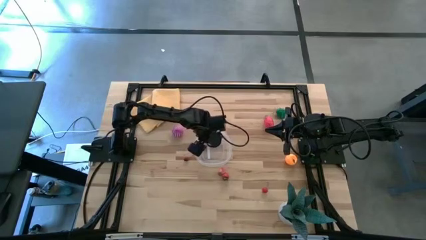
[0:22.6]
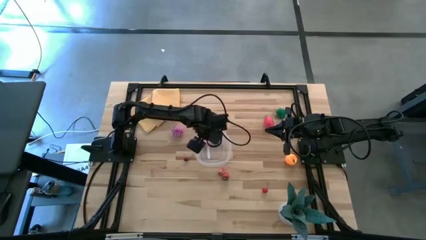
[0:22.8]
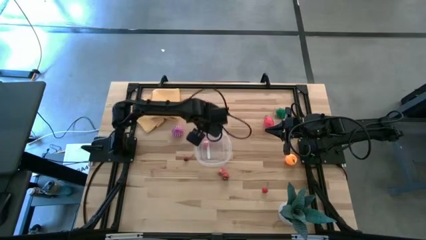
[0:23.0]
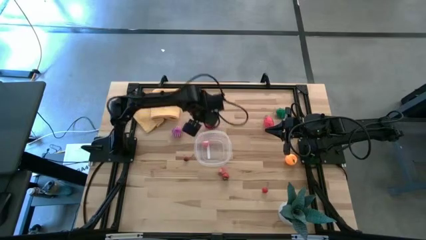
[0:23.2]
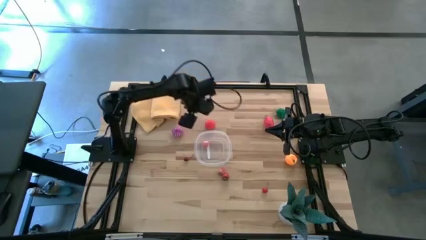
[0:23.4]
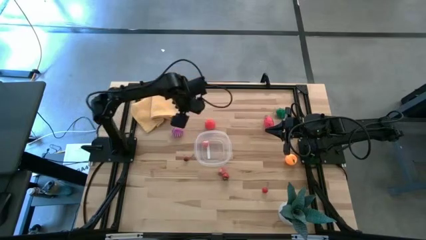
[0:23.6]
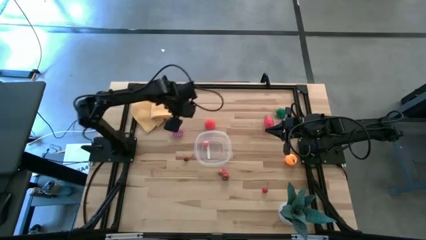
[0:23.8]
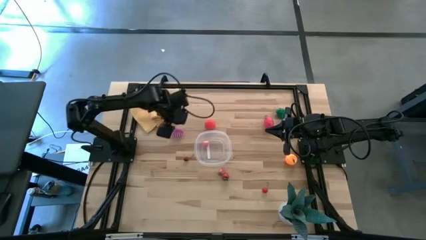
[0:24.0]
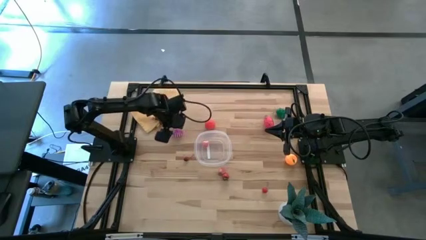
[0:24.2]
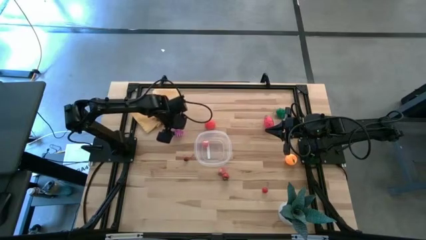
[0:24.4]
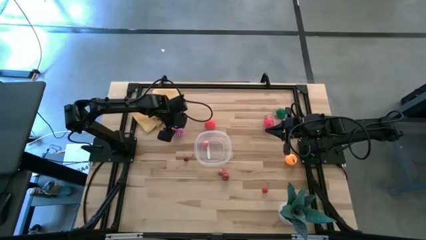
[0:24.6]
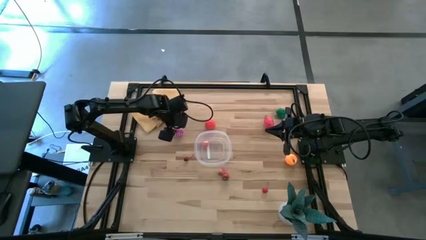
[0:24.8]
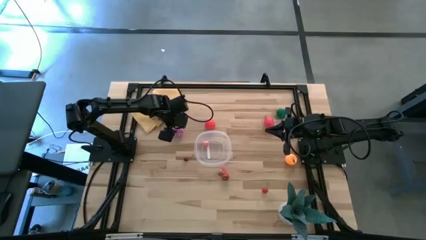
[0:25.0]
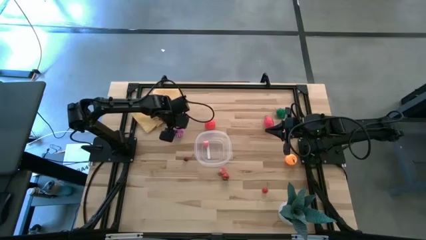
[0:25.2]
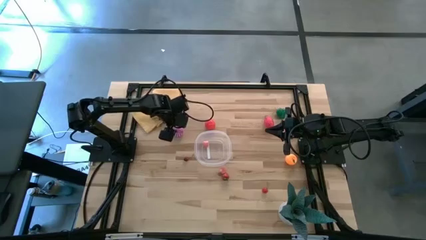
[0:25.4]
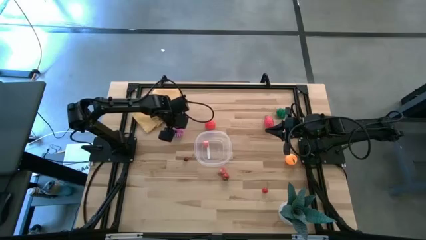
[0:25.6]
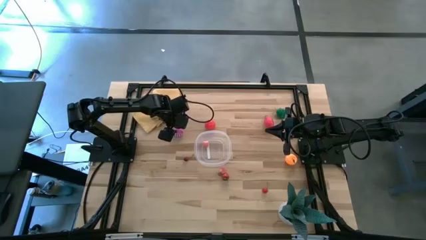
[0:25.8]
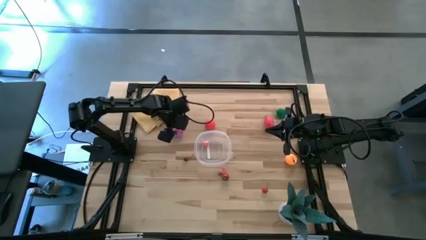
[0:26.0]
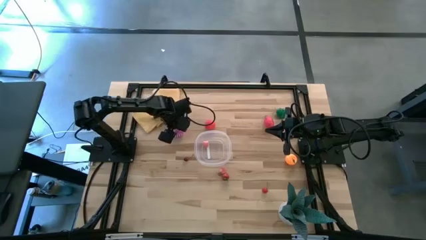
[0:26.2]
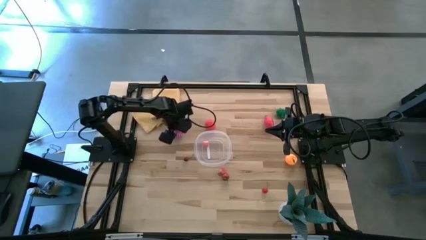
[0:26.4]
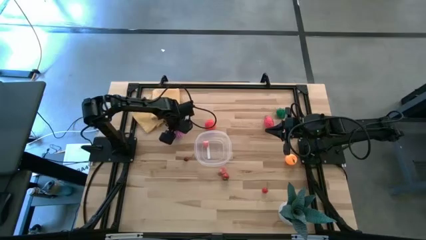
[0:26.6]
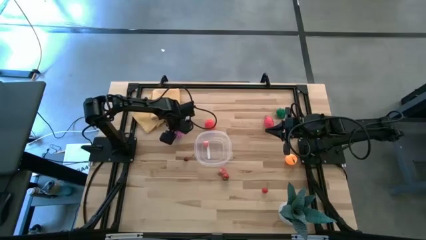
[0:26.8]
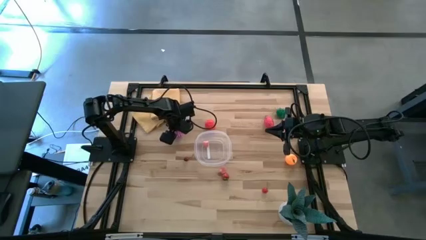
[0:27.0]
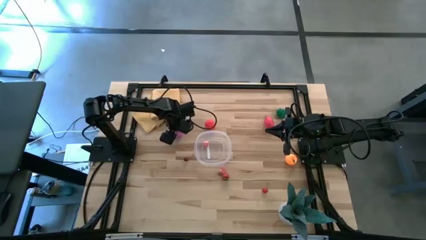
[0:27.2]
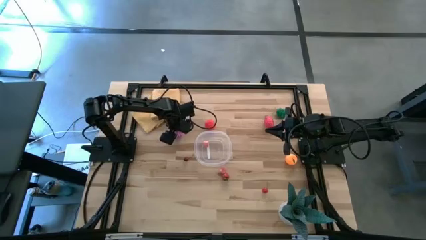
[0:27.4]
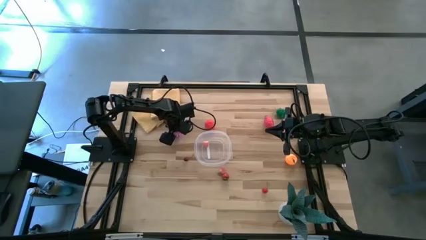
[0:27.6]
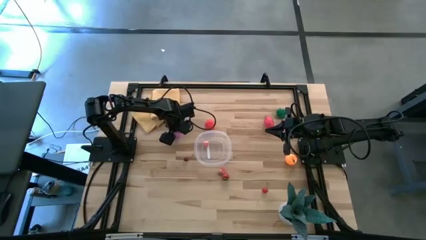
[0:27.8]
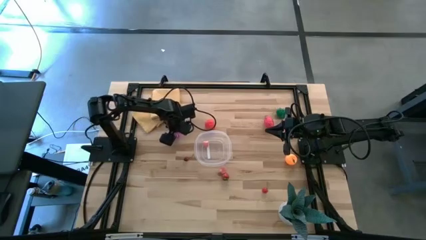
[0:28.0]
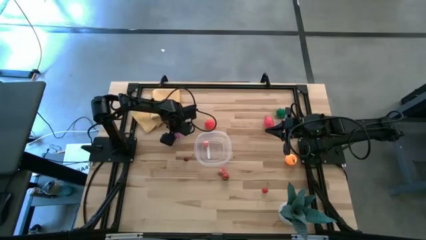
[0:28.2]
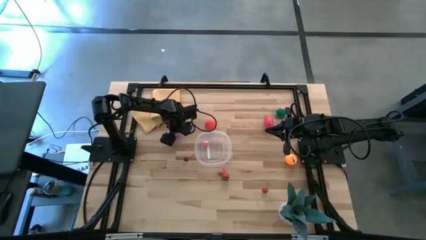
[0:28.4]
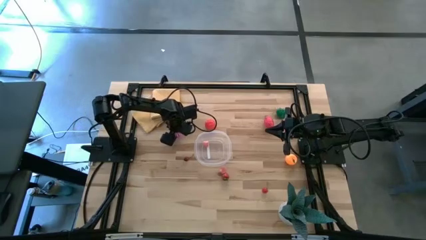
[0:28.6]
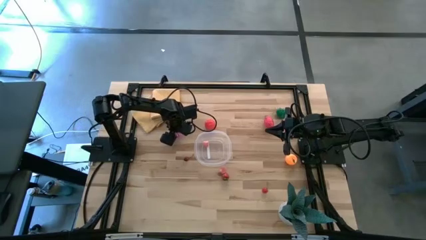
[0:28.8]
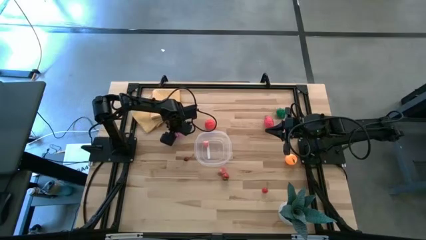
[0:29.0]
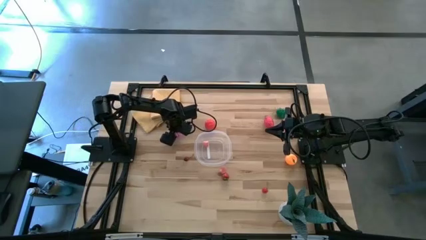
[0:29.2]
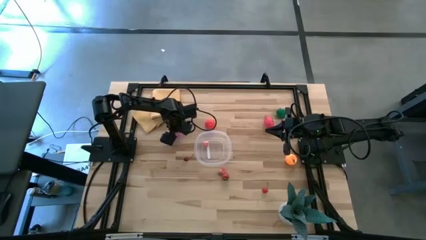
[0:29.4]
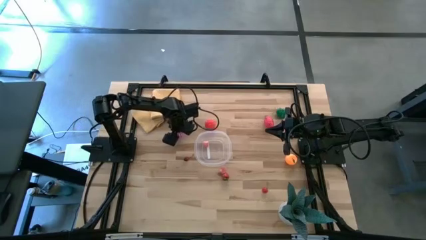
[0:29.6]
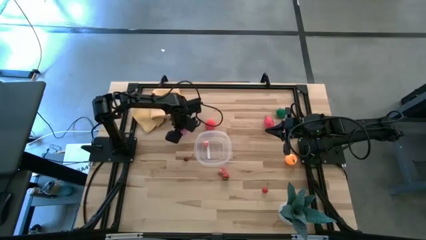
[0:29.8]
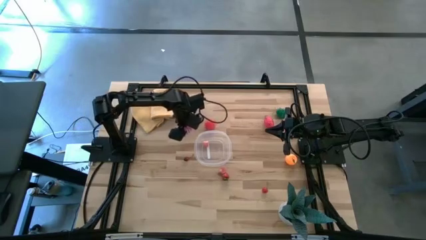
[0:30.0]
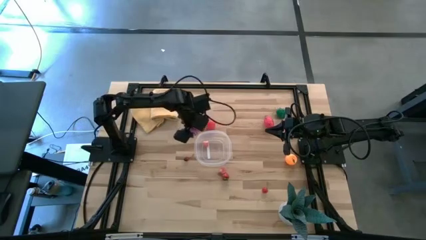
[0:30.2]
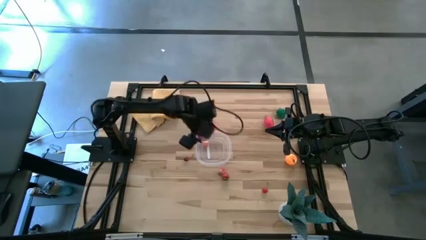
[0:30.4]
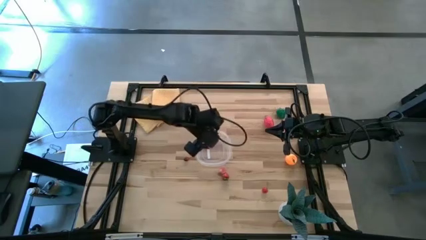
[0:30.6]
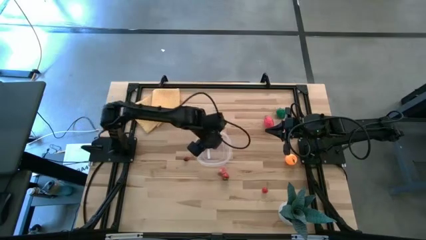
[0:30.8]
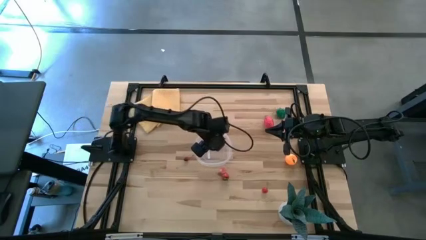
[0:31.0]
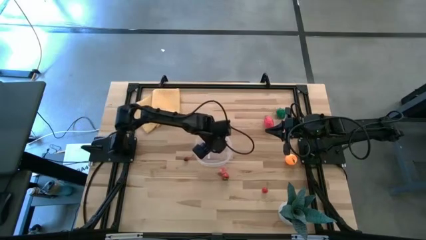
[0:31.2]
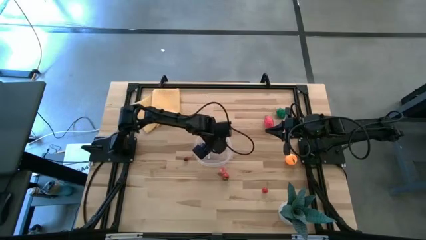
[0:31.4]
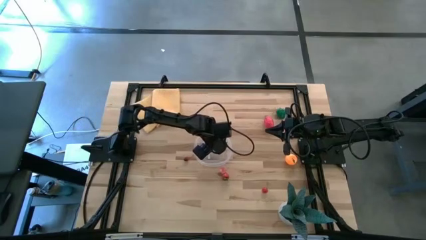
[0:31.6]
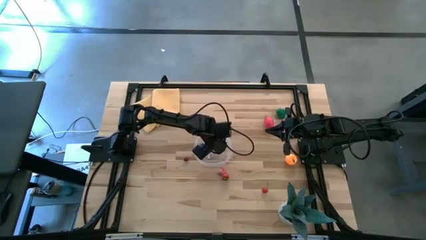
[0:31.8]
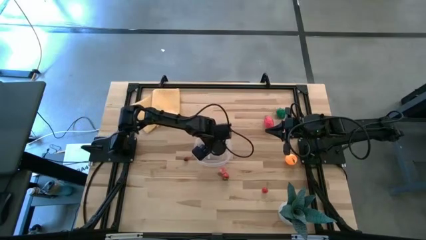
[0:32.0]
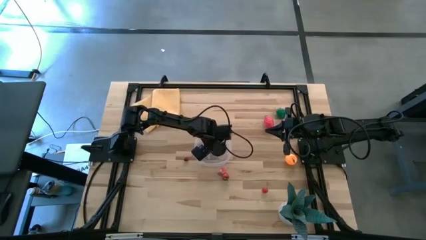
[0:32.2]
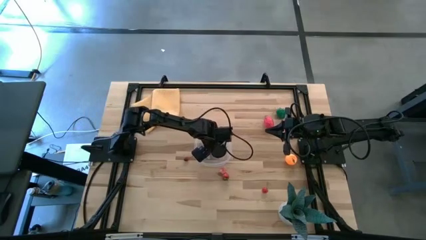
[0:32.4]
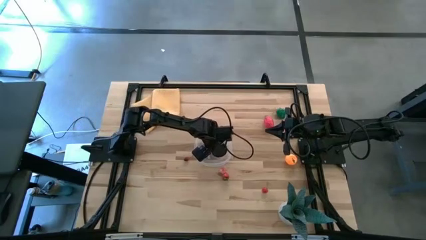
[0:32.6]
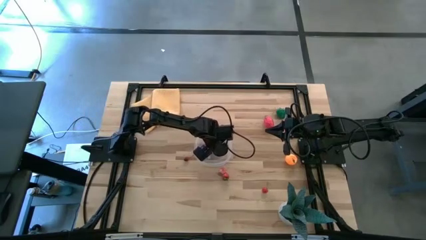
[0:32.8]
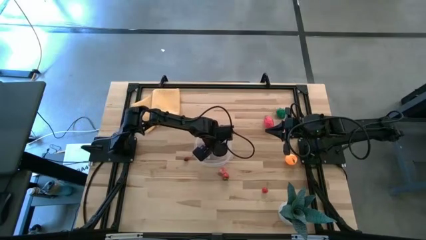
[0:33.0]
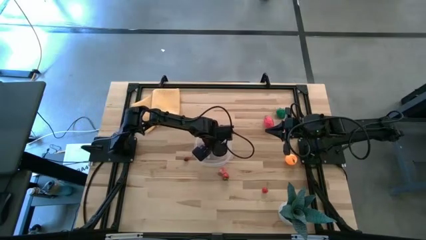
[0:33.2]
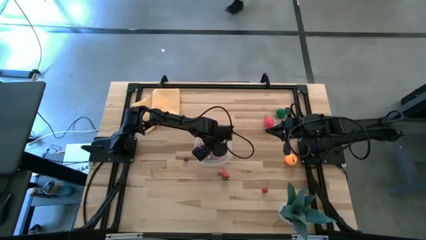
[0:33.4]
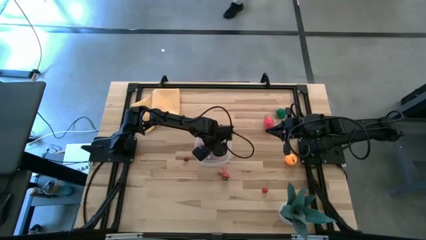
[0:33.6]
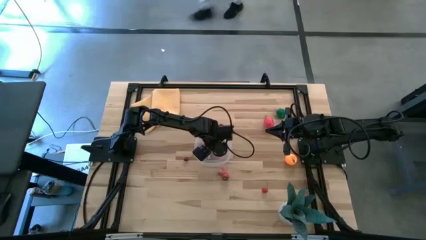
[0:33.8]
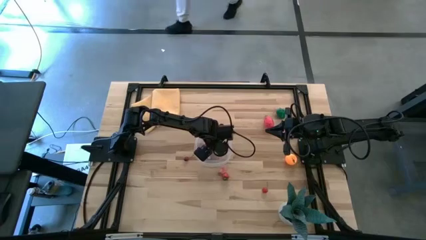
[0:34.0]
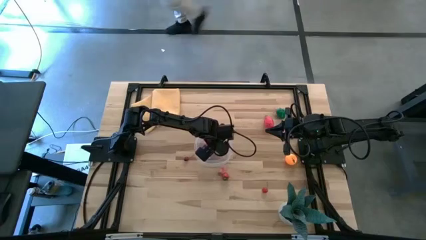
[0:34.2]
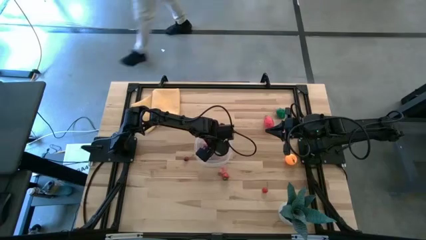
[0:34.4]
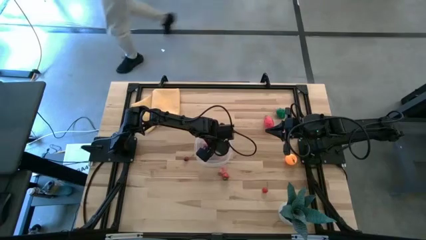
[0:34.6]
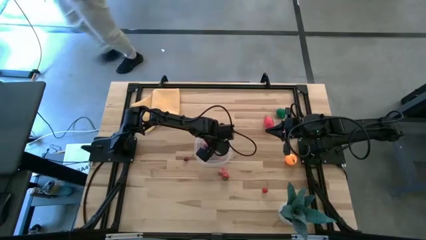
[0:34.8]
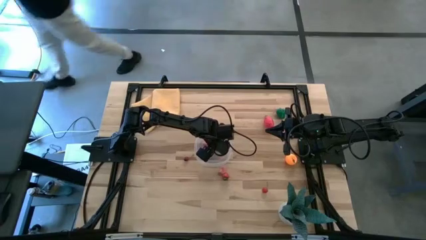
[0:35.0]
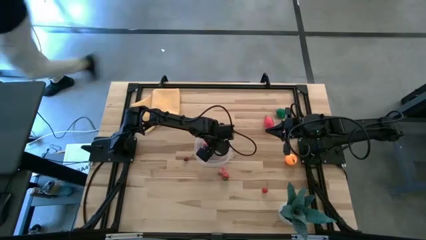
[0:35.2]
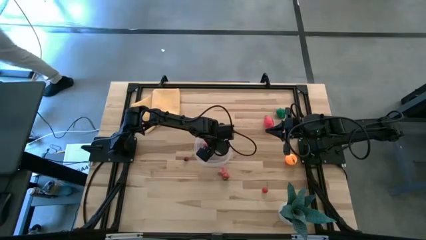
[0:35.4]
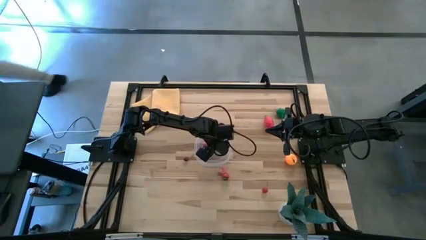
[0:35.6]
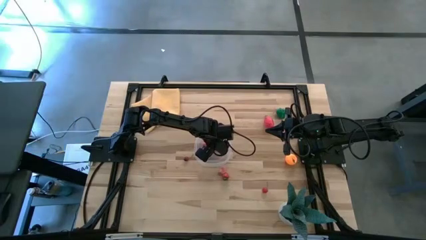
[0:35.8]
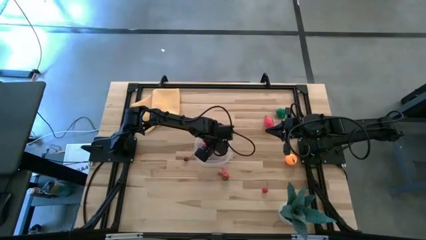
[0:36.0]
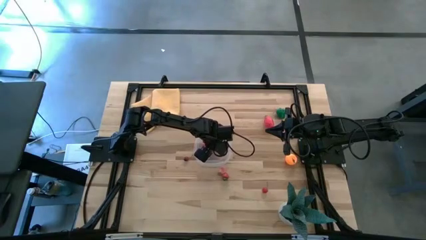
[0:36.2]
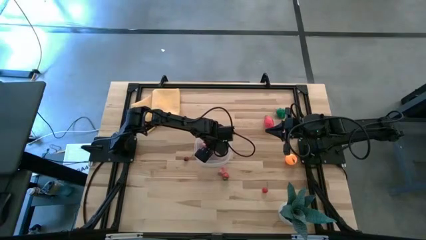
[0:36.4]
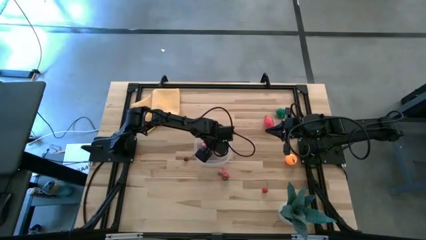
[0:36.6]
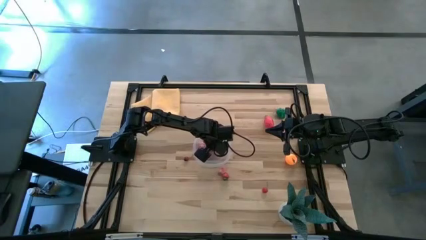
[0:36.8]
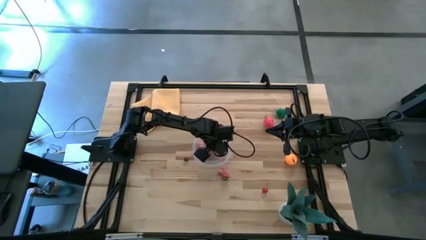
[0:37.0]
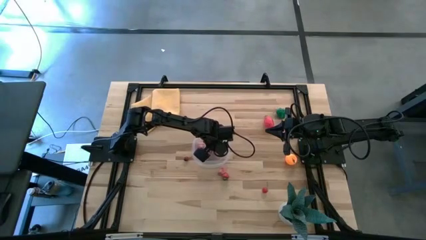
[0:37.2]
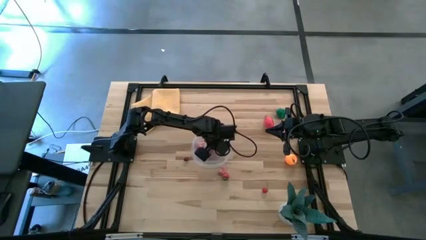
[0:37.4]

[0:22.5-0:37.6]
Task: Pick and placing Produce into tupperware
Put the onion into the transparent bin
